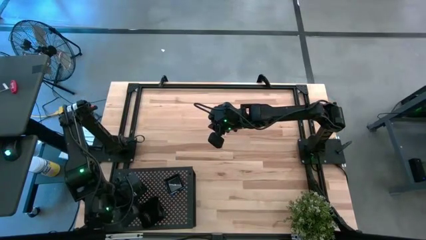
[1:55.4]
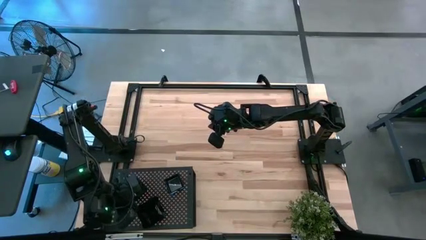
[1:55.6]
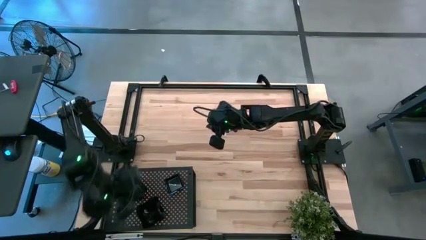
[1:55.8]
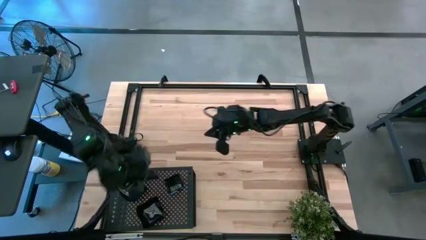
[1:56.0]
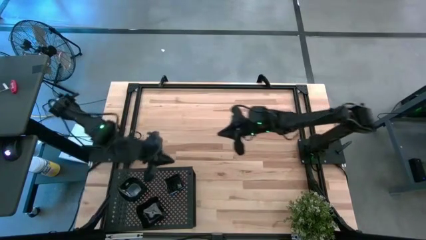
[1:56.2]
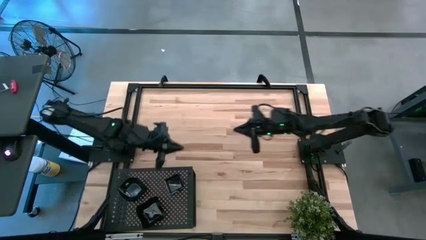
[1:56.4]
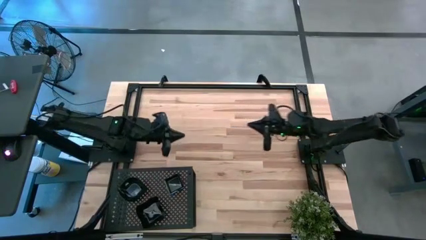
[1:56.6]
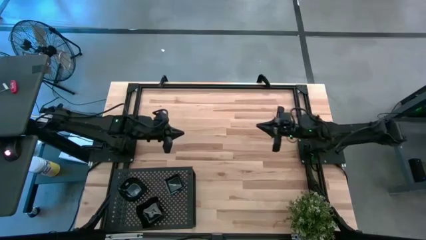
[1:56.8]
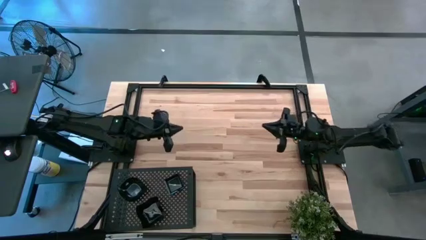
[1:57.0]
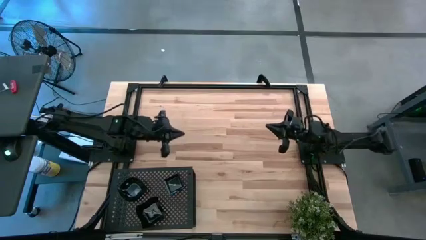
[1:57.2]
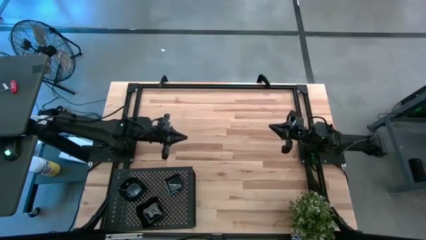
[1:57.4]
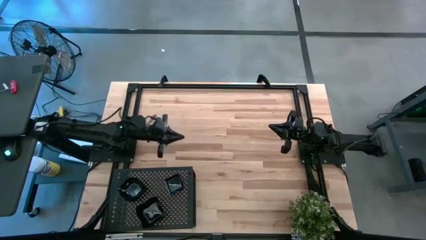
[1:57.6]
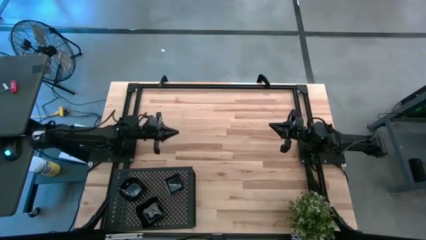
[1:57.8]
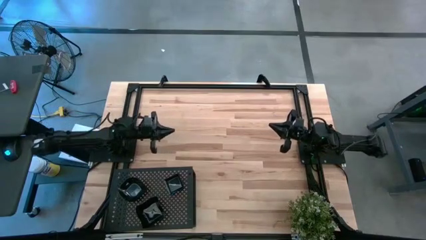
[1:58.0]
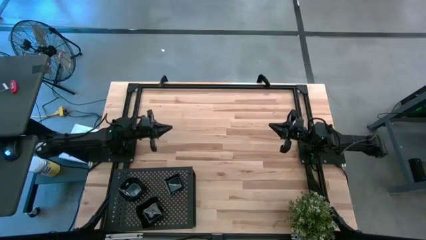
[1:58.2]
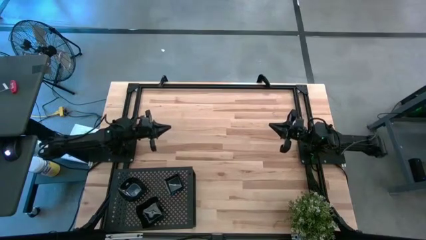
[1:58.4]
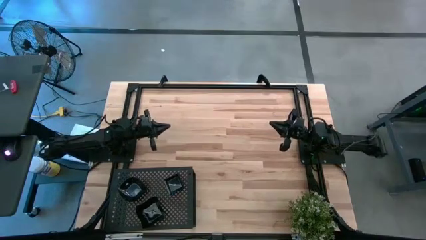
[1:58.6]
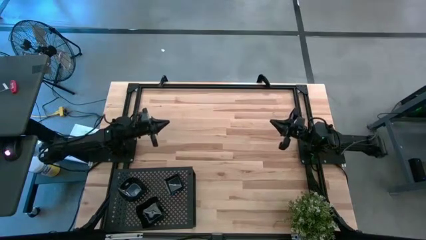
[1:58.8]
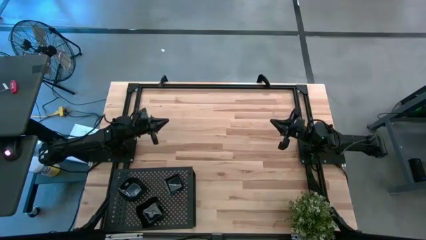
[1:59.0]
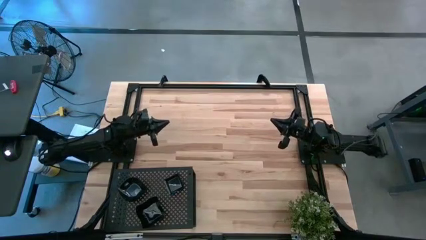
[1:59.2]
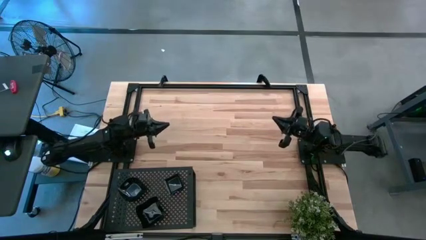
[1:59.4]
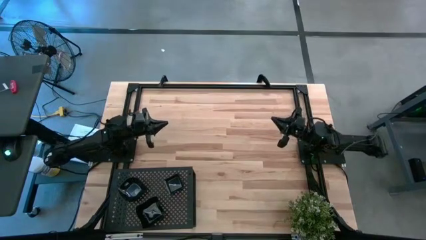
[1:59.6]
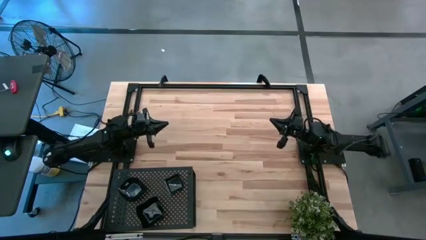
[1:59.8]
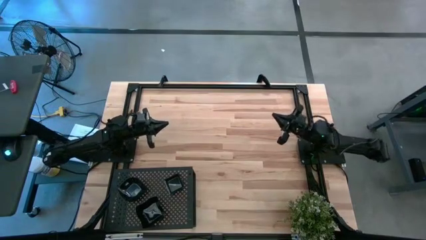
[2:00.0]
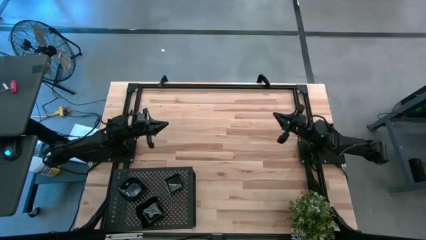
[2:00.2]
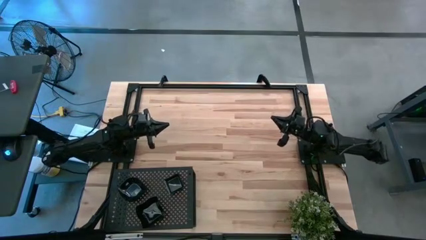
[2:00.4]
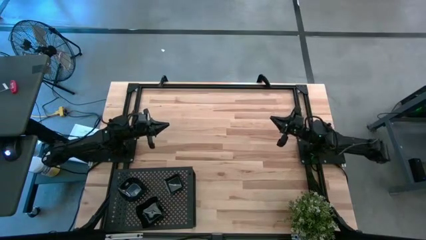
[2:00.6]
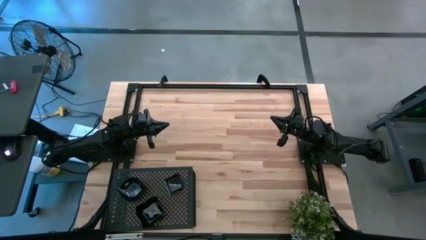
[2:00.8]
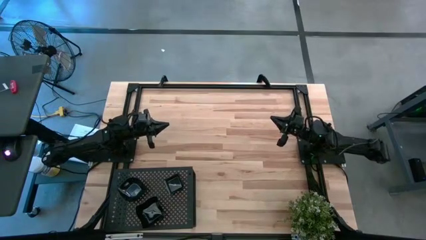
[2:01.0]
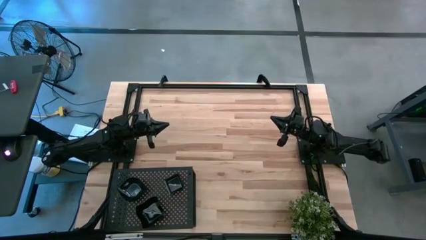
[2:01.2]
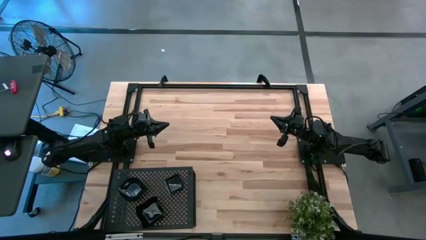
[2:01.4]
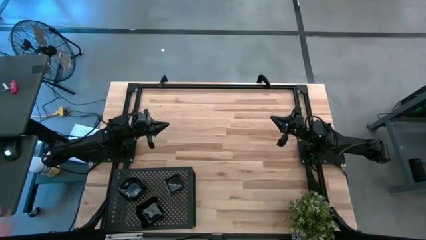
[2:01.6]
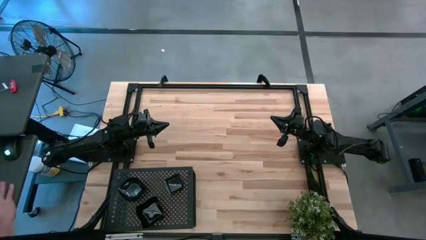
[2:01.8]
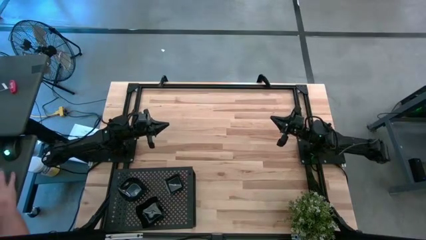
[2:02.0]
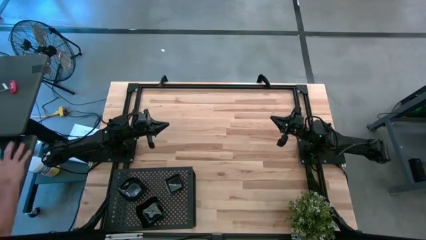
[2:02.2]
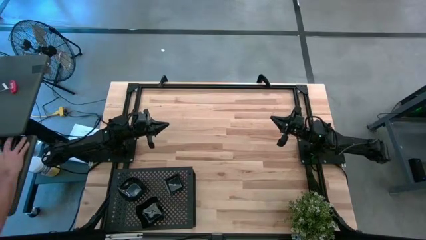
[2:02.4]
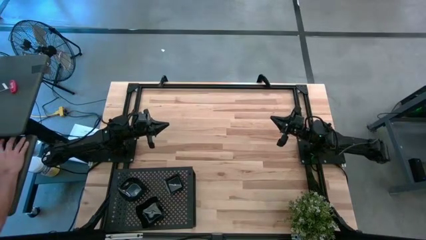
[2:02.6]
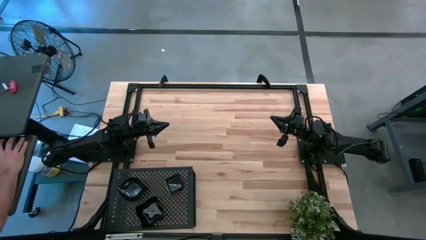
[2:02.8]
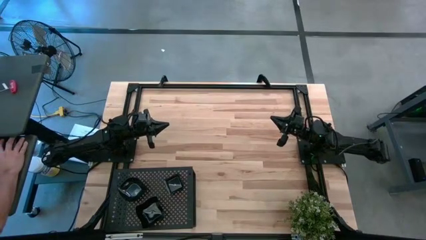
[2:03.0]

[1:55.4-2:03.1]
Task: Pick & Place Mini shaped plates
Return to Home Position

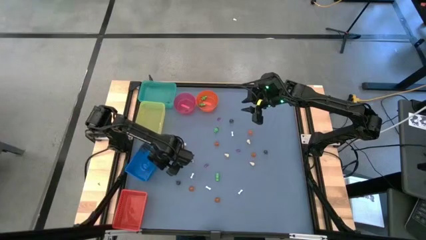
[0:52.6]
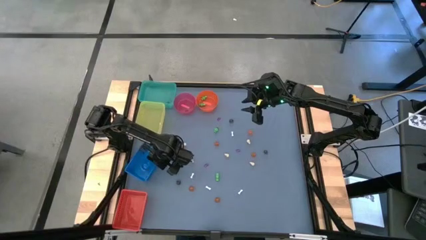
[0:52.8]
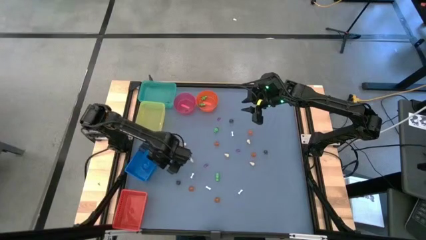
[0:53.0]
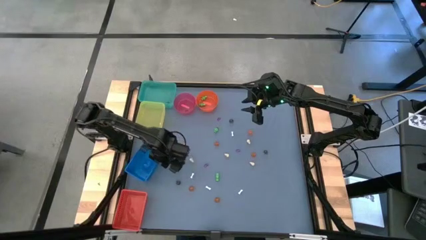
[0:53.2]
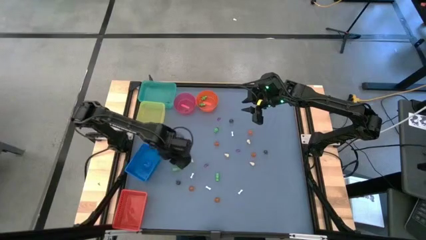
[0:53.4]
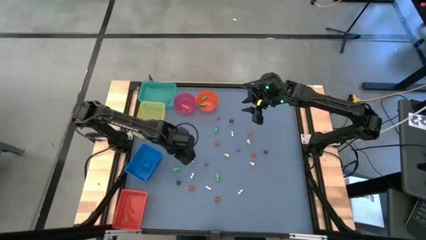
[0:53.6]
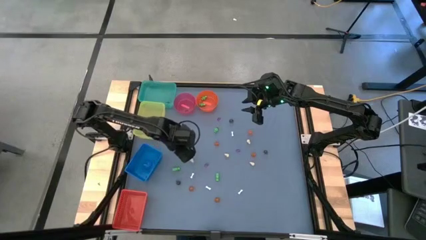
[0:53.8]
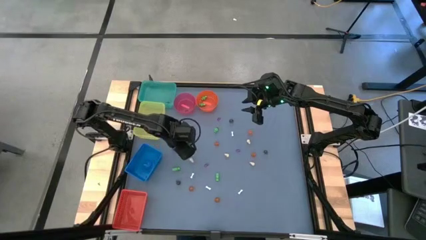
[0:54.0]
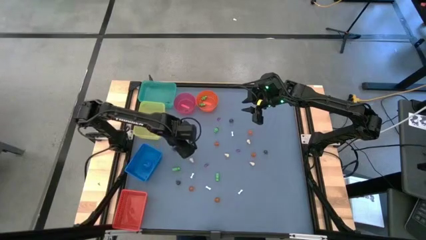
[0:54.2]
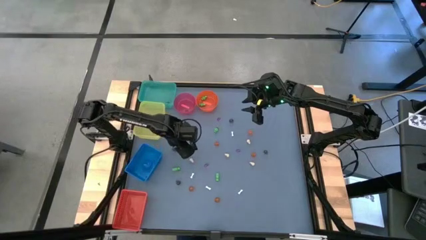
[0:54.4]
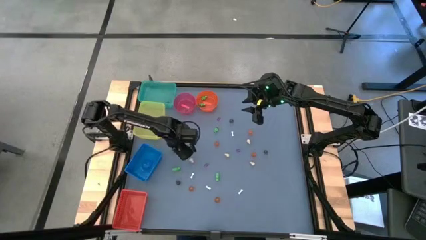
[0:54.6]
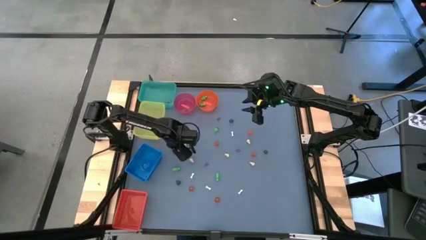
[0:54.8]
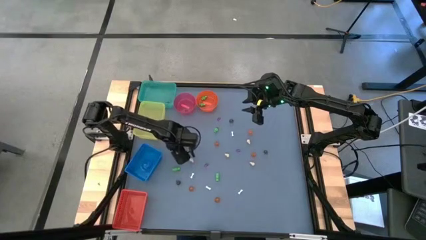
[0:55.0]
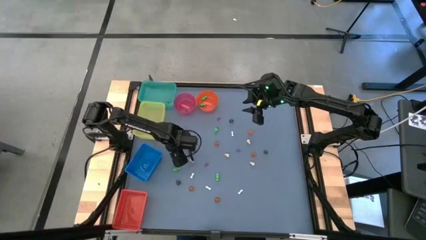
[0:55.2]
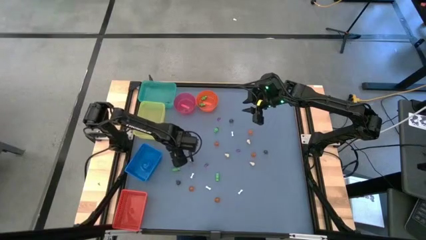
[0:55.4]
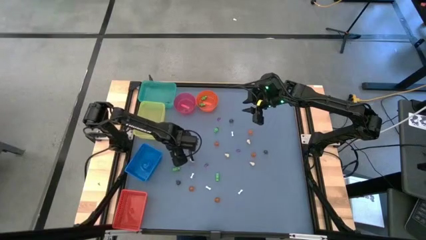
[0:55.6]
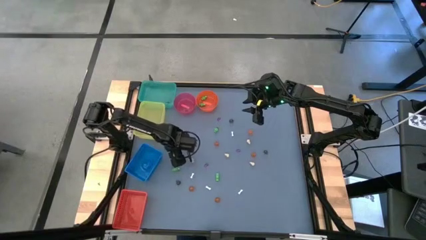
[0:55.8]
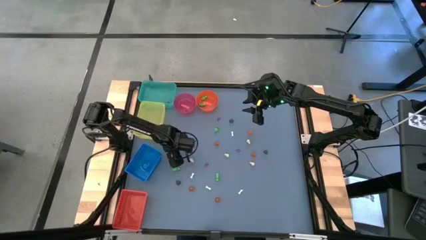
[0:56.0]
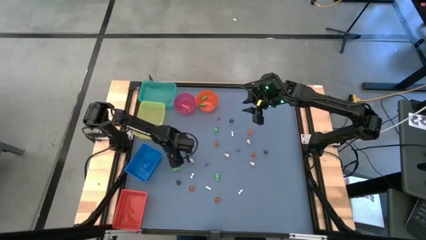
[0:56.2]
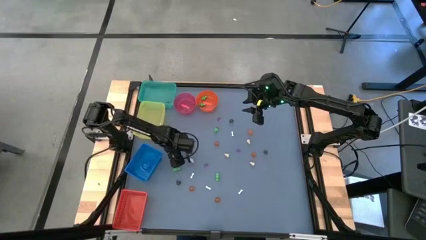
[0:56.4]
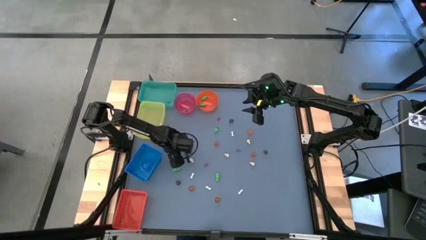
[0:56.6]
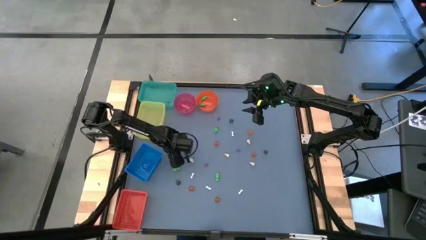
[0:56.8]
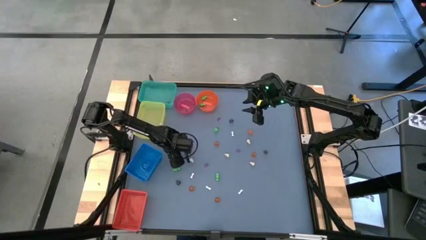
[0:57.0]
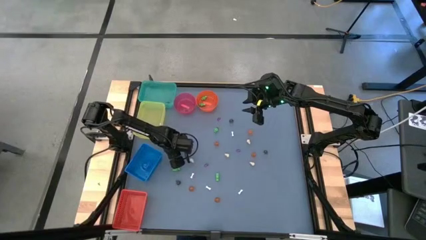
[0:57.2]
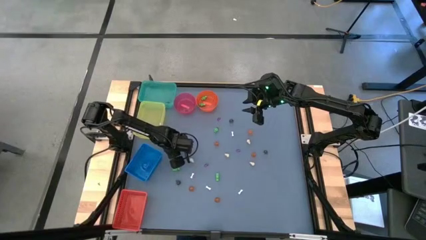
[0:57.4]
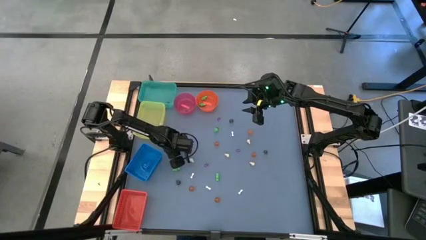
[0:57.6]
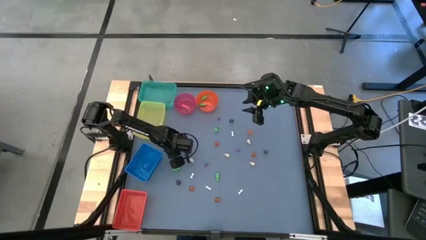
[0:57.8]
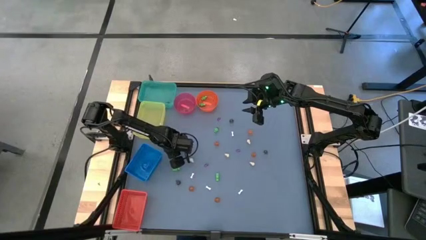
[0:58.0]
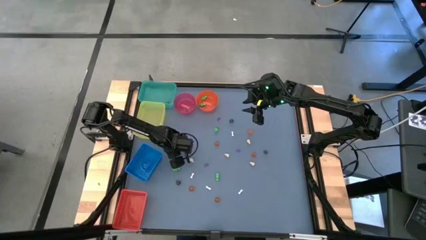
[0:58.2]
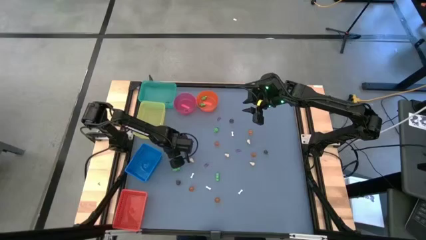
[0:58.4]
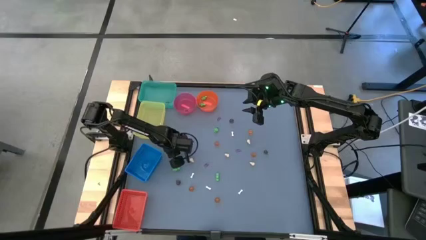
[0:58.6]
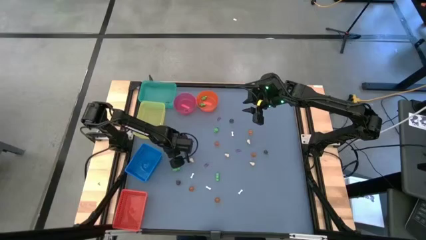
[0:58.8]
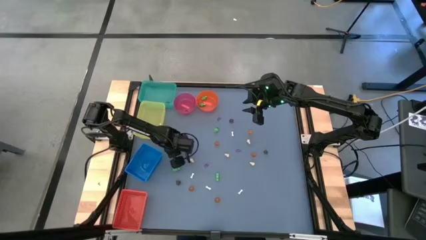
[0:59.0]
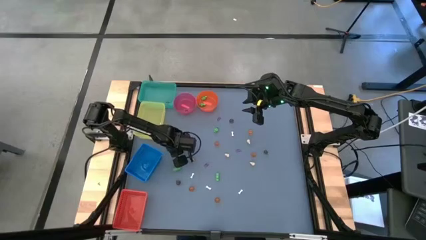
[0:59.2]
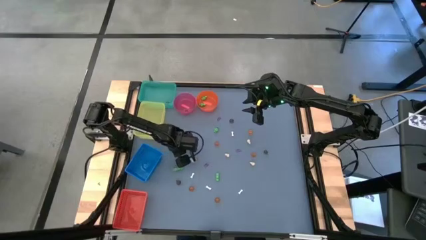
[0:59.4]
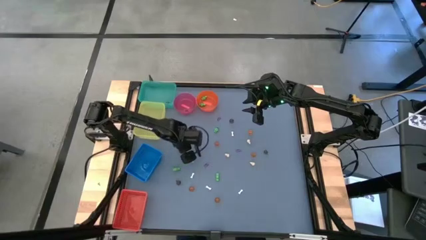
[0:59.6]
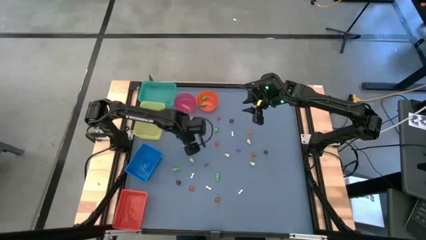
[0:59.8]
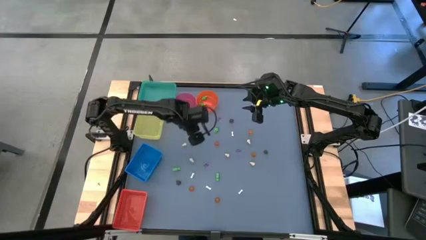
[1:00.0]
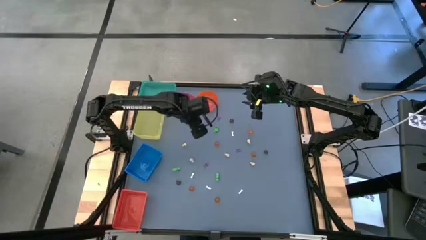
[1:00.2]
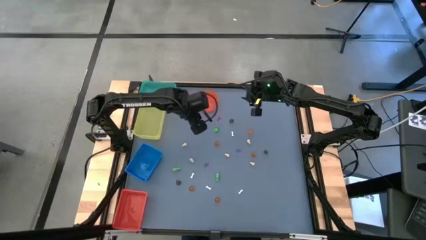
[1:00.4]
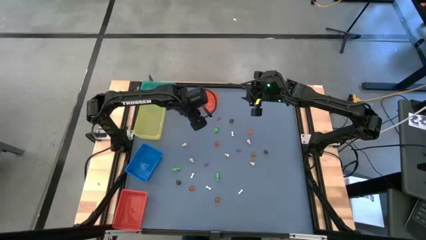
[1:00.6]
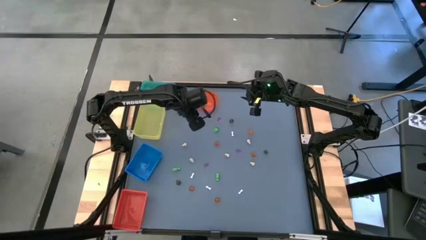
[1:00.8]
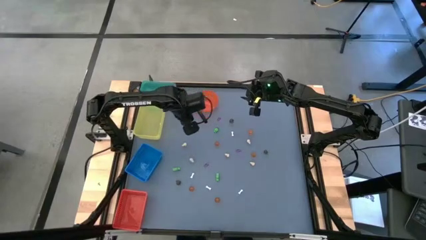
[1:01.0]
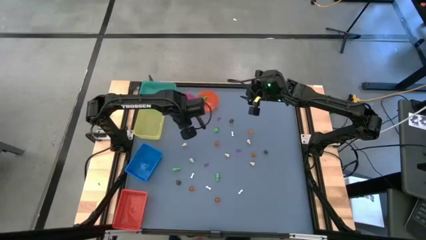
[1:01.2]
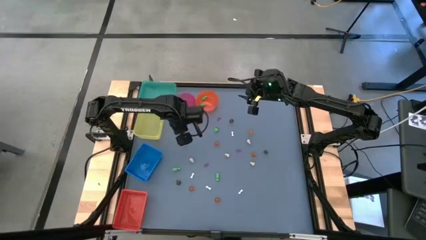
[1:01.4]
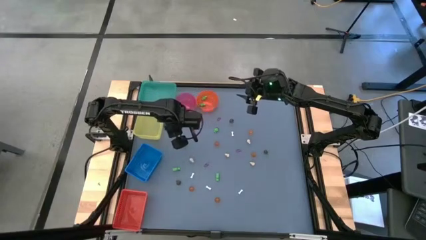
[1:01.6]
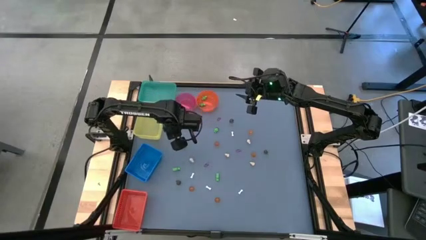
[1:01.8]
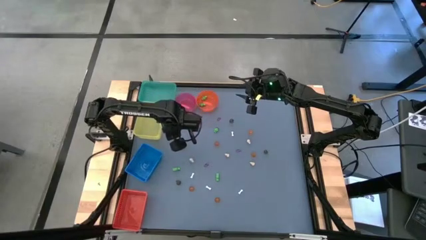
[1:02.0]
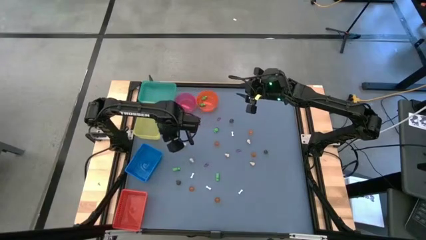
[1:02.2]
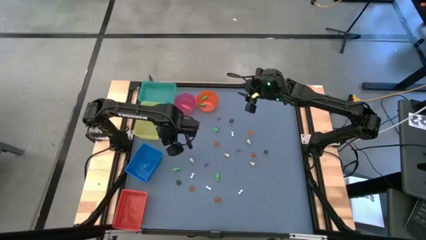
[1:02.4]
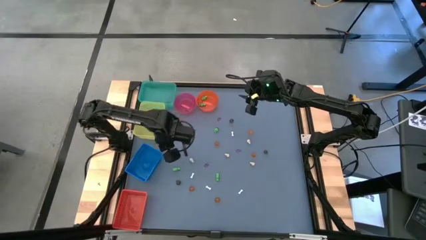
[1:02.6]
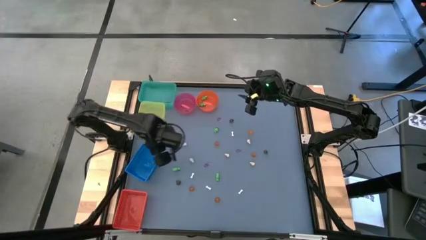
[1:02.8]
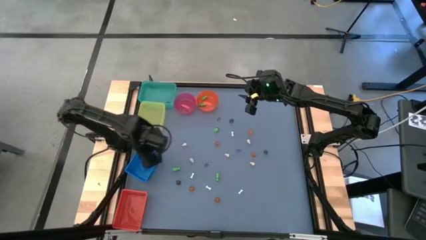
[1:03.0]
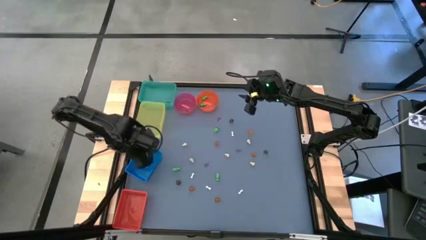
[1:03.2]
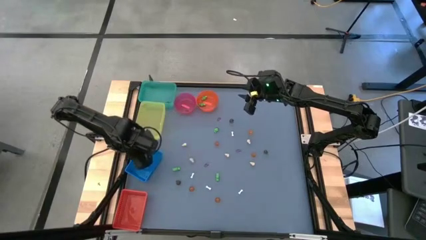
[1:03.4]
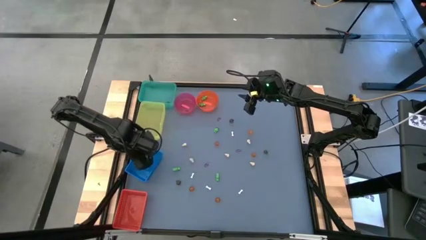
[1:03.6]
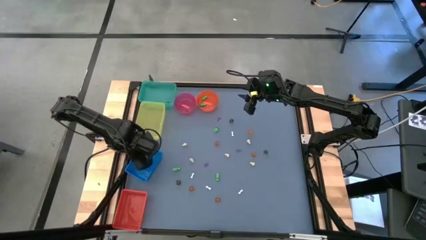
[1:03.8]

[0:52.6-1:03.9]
Task: Sort Halloween decoration
Put the black skull toy into the green bin
